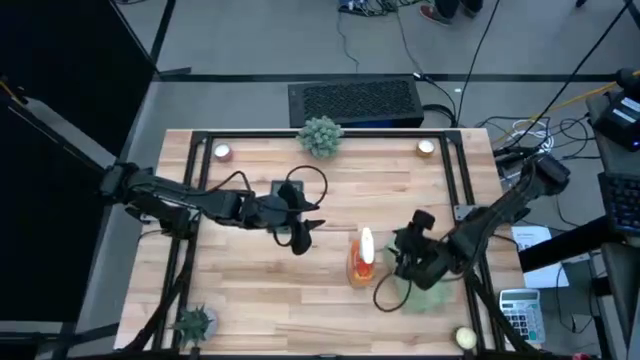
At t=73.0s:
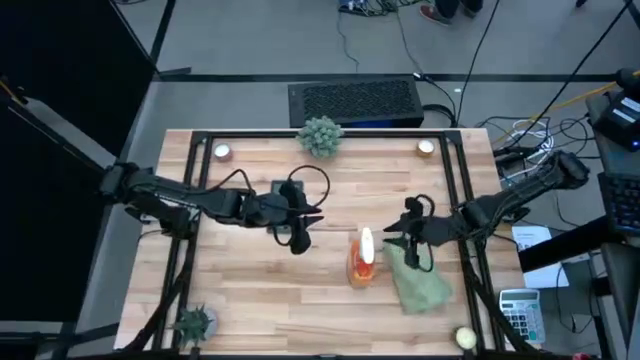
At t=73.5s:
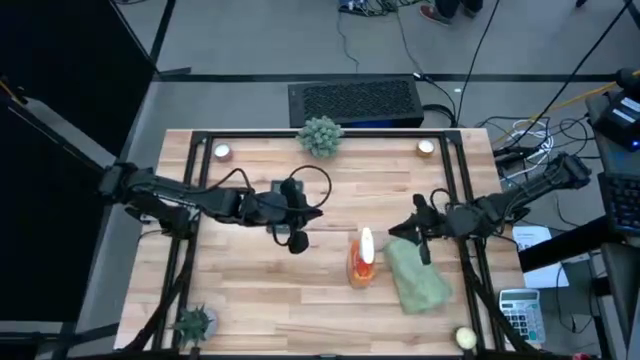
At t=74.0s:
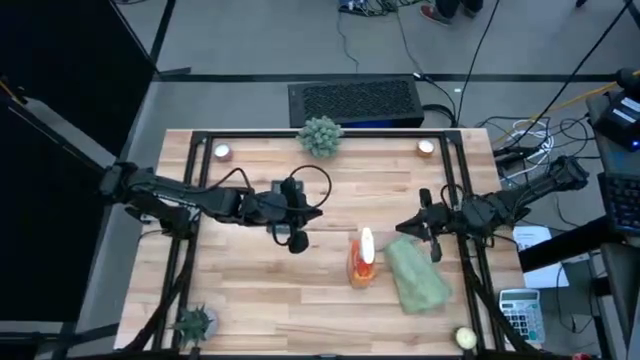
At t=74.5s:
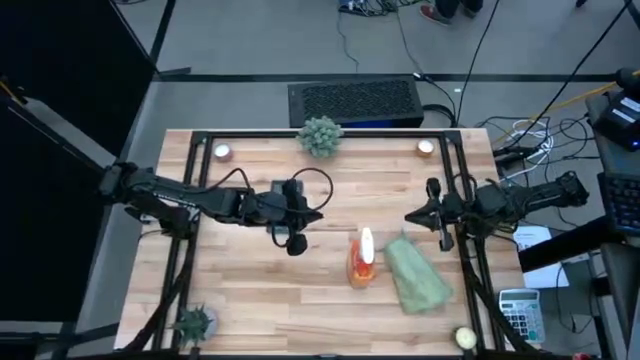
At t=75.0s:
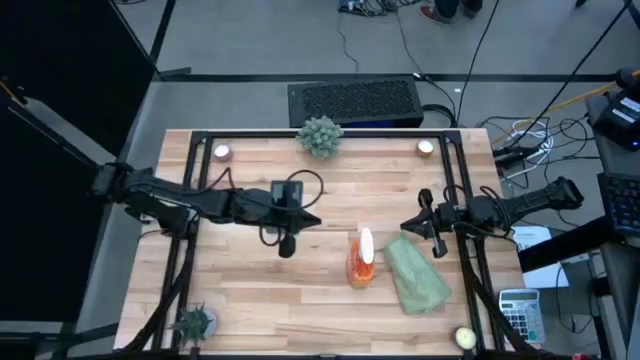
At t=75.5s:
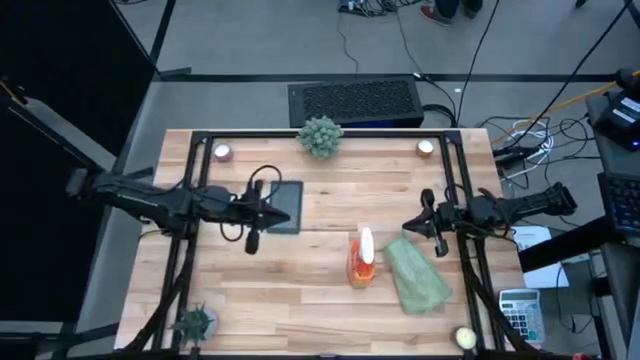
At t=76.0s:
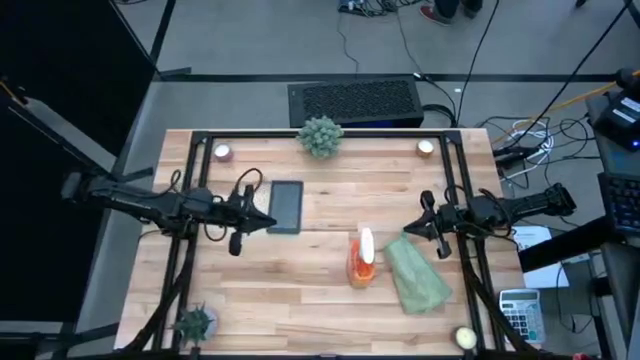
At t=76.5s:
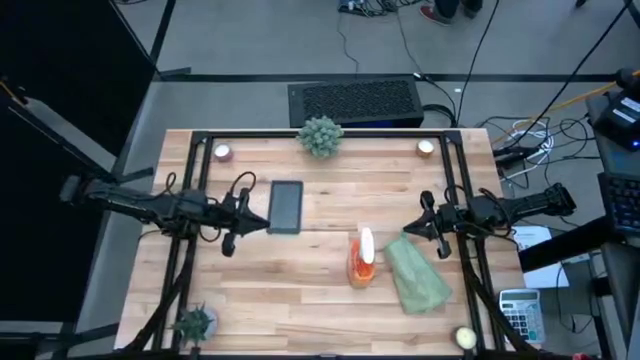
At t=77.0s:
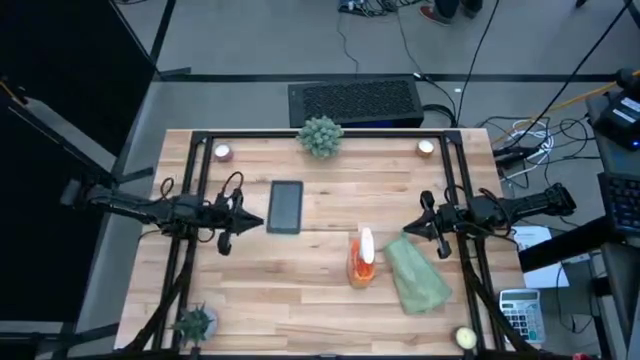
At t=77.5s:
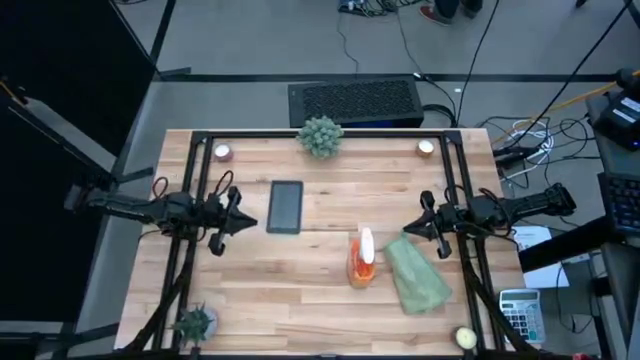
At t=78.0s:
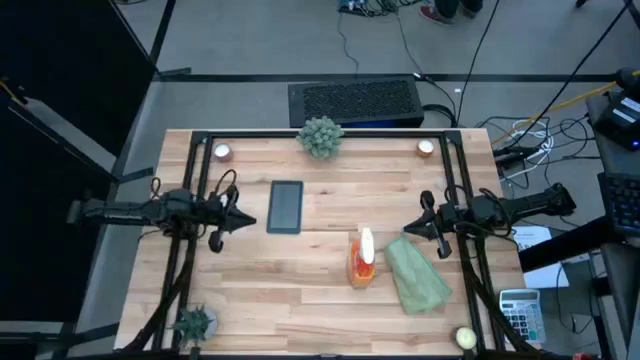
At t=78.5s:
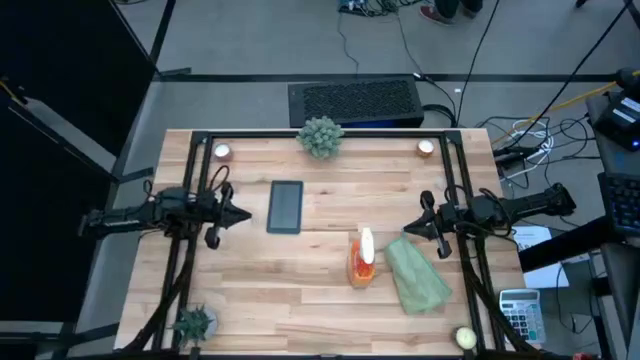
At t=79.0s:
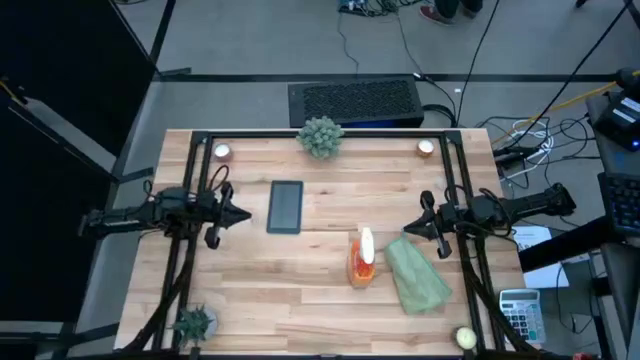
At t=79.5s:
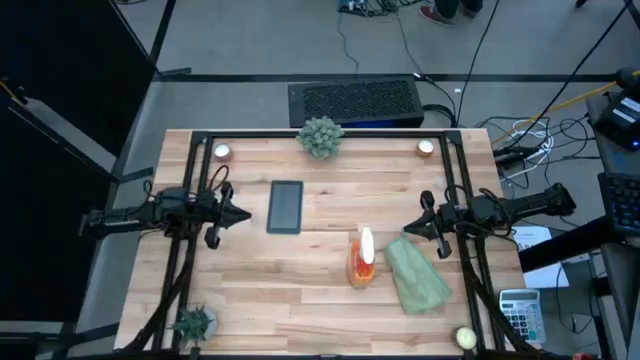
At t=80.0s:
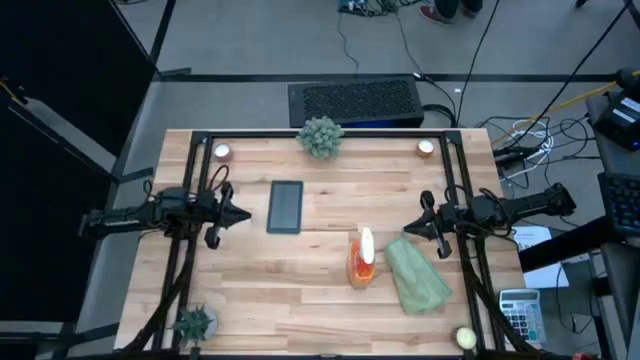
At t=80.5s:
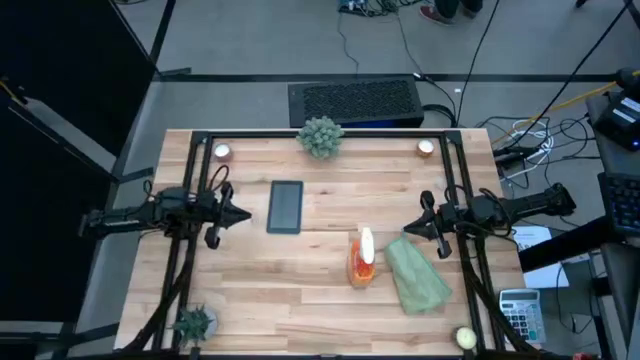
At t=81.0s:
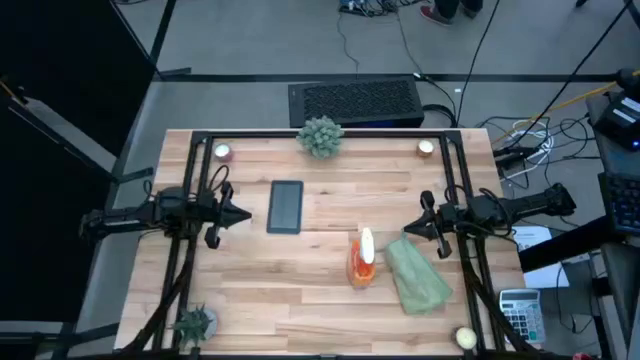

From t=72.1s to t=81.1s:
Task: Apply microfiber cloth
Return to Home Position

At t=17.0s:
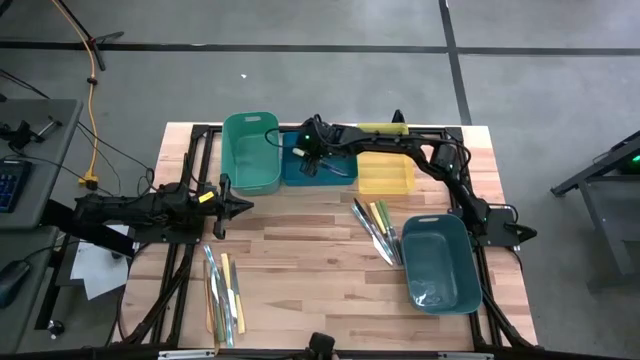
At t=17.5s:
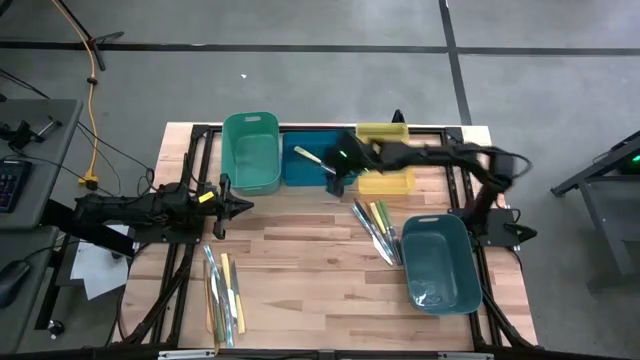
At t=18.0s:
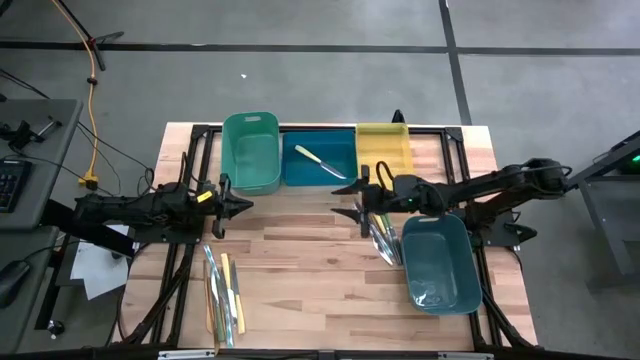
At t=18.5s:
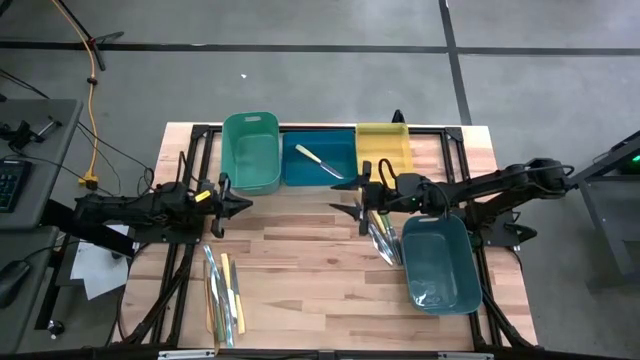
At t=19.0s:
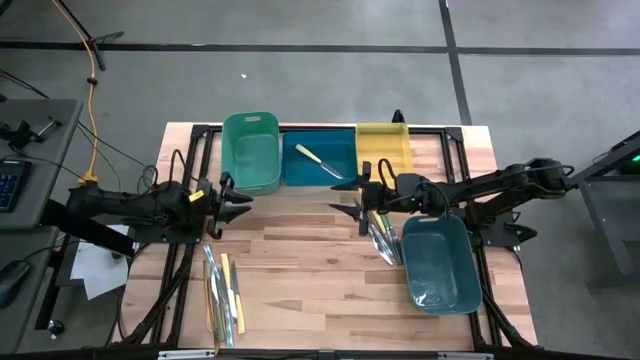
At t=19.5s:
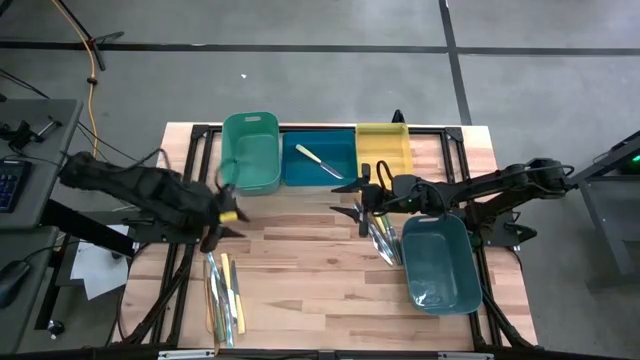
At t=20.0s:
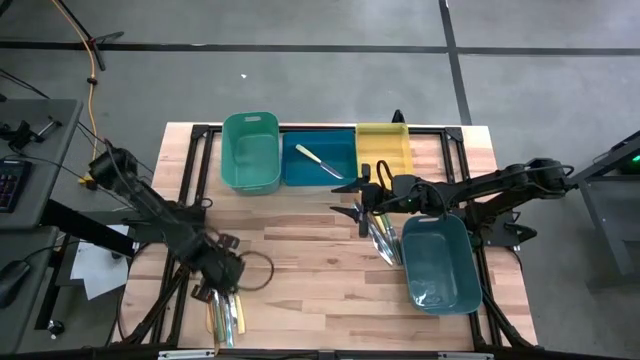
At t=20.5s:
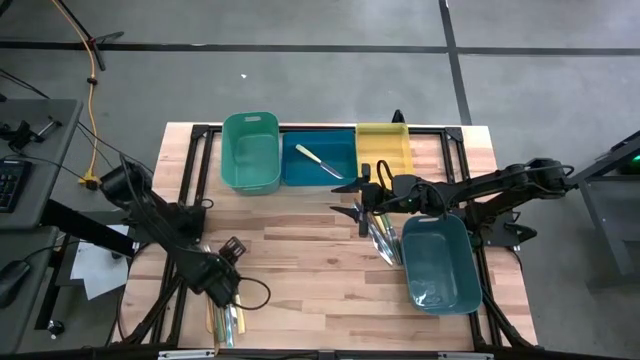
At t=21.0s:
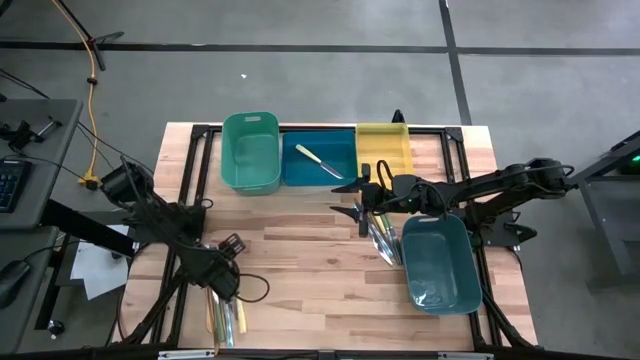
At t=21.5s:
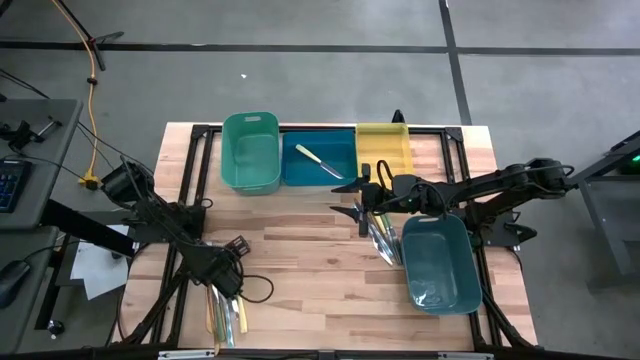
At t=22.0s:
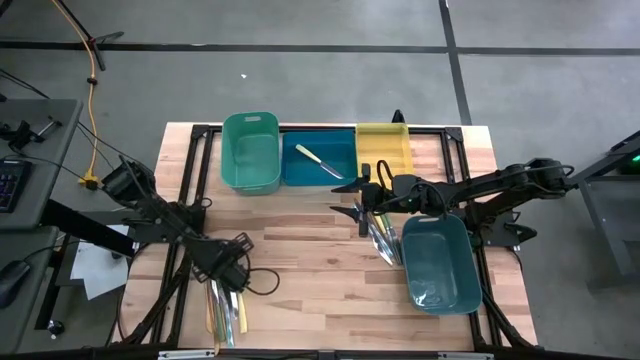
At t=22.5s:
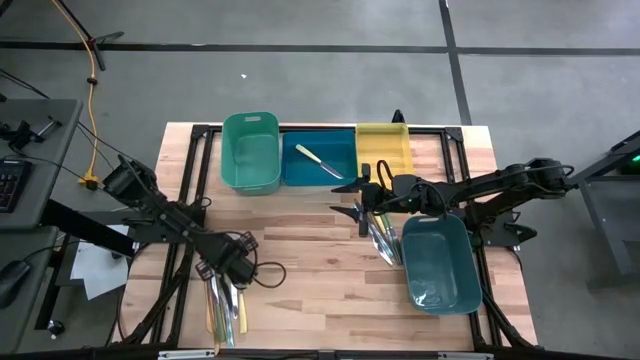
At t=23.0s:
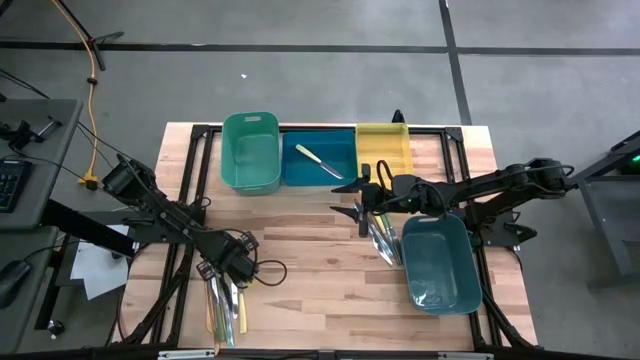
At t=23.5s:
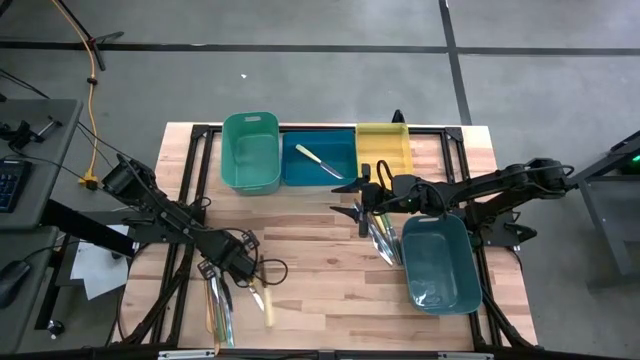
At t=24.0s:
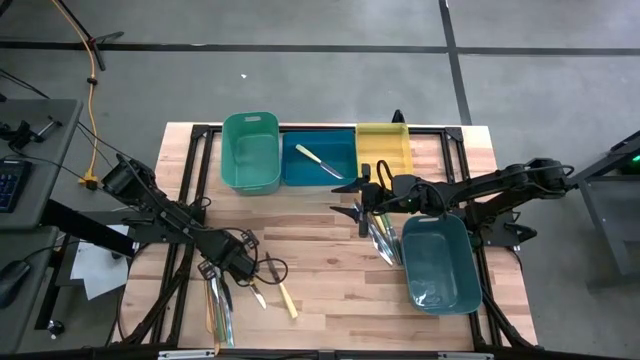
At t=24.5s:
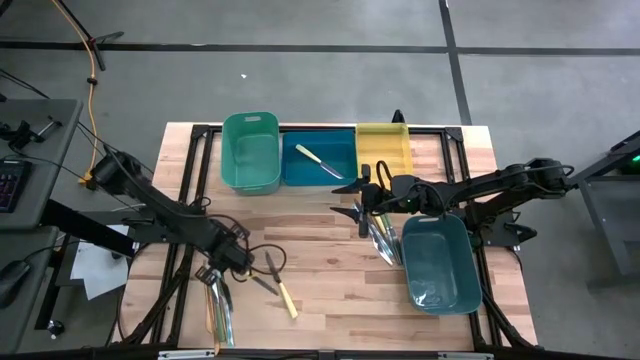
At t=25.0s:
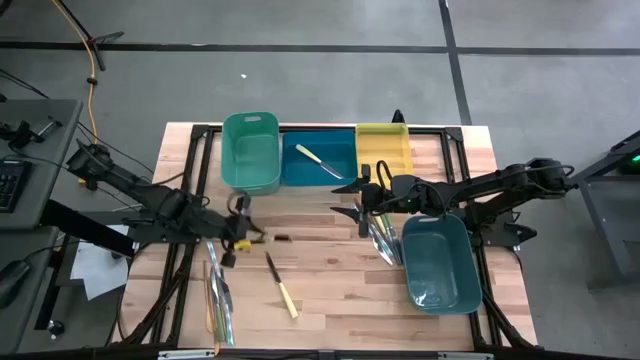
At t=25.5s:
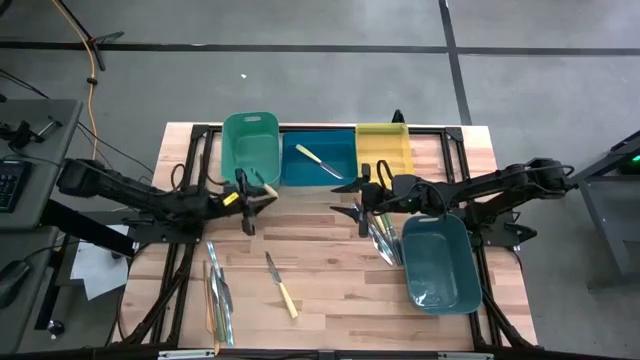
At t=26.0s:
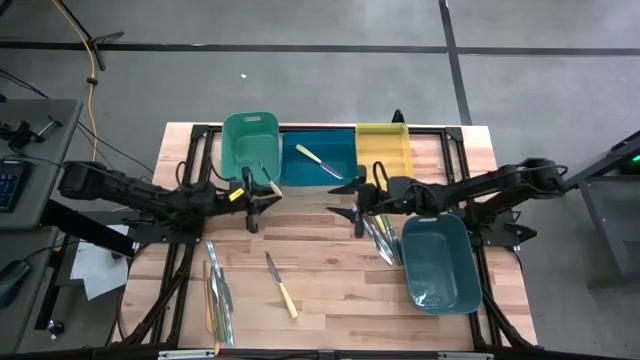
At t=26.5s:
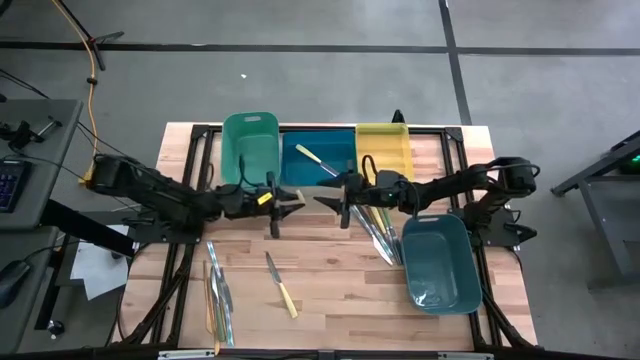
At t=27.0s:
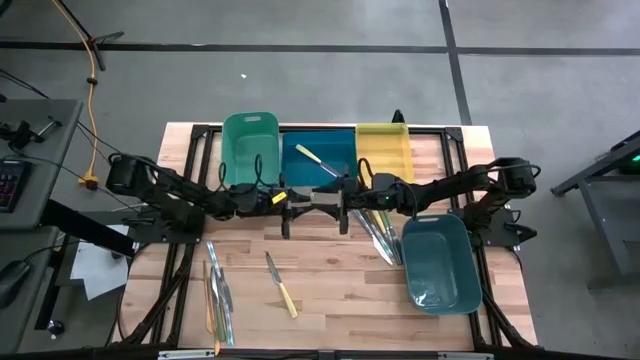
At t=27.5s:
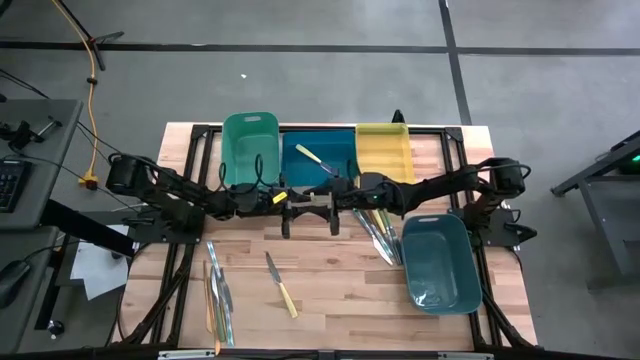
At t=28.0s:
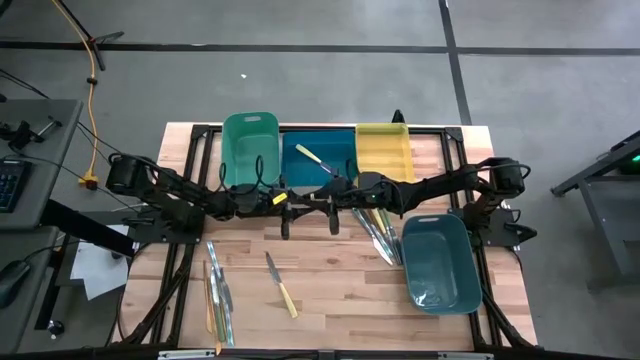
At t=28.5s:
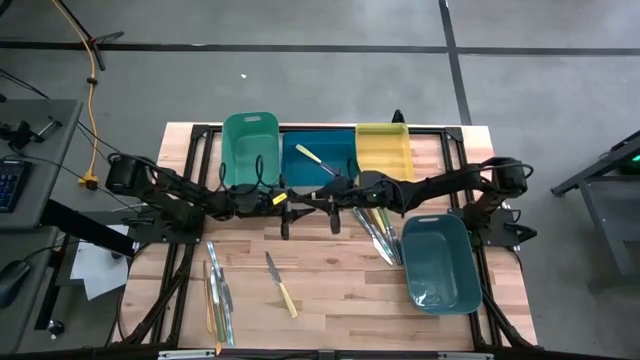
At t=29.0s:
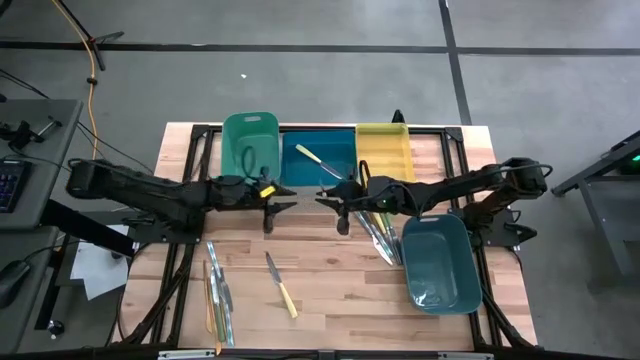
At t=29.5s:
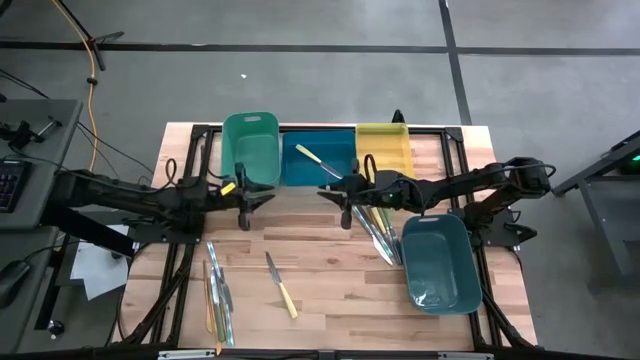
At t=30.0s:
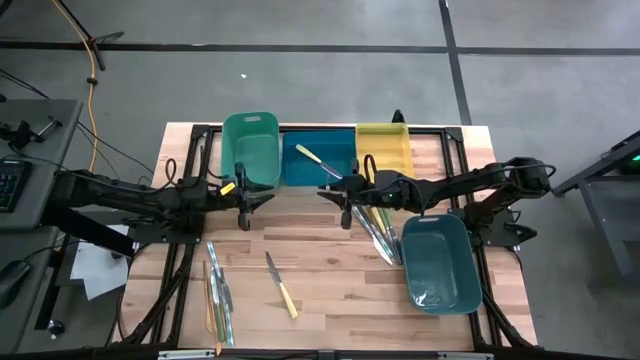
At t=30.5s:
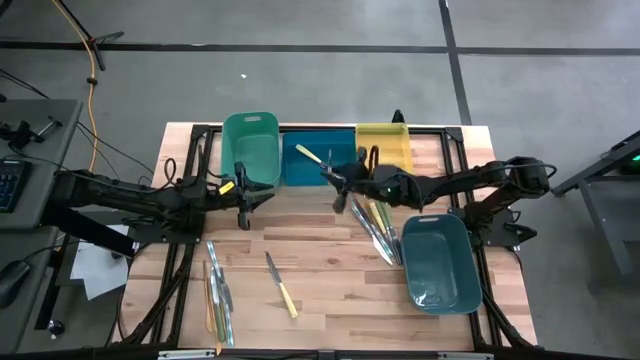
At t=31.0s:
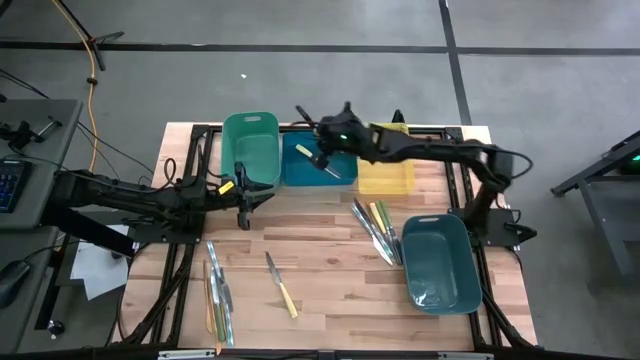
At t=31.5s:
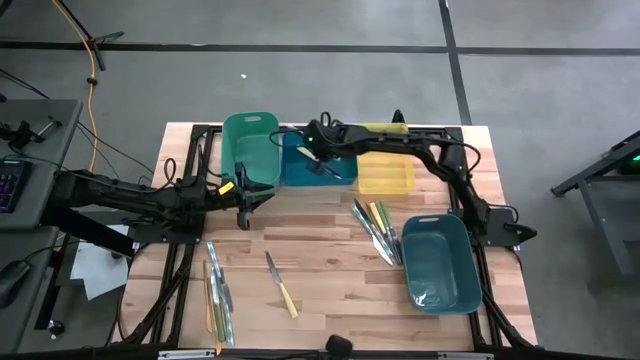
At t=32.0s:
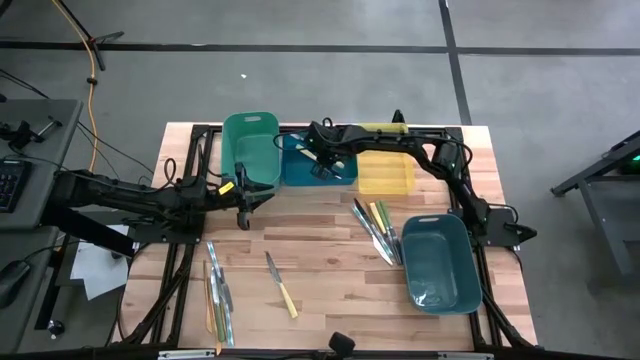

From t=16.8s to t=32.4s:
Task: Sort silverware by color (type)
Put the yellow knife into the blue bin
